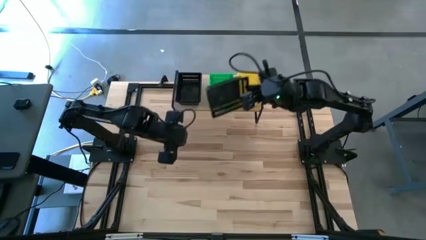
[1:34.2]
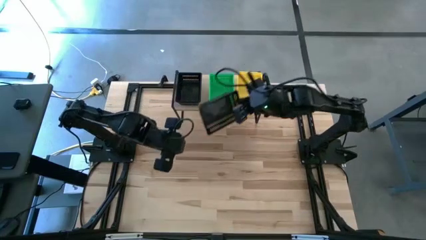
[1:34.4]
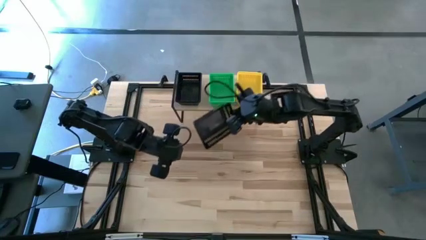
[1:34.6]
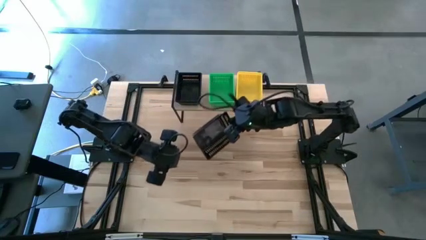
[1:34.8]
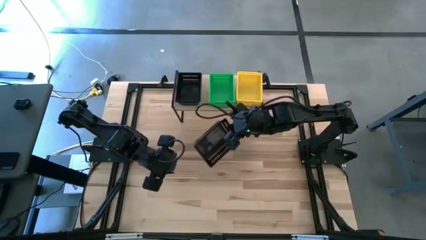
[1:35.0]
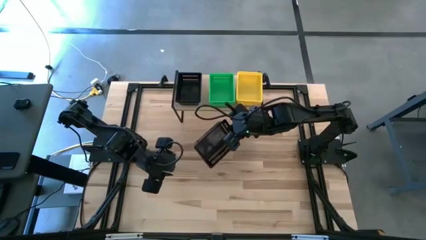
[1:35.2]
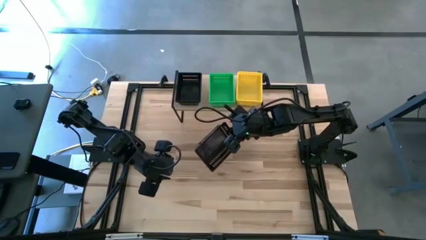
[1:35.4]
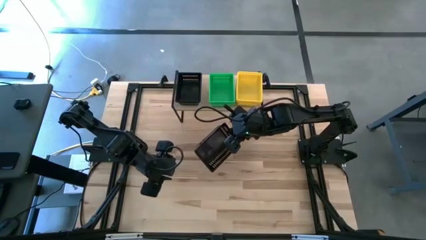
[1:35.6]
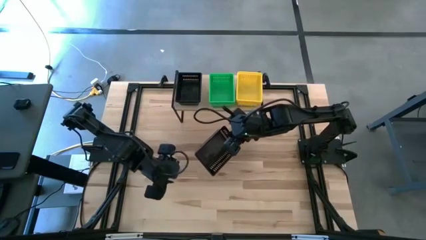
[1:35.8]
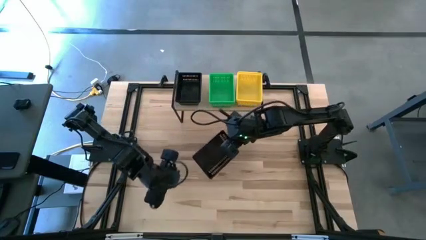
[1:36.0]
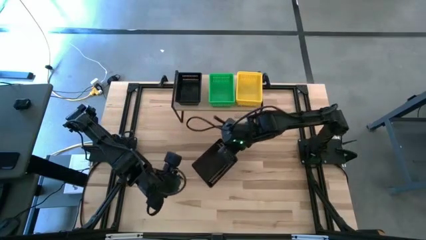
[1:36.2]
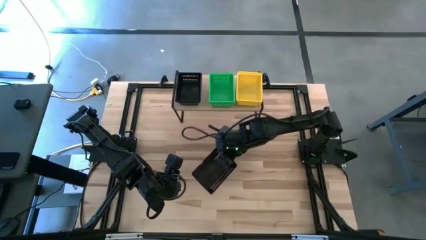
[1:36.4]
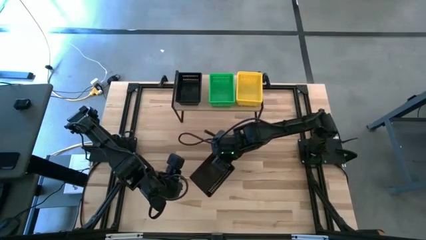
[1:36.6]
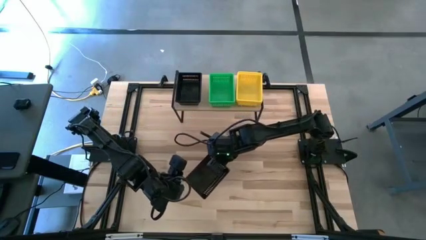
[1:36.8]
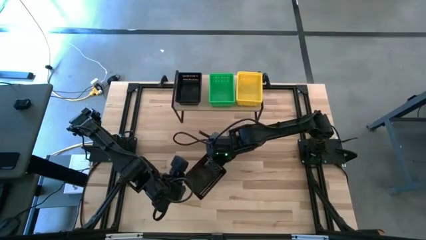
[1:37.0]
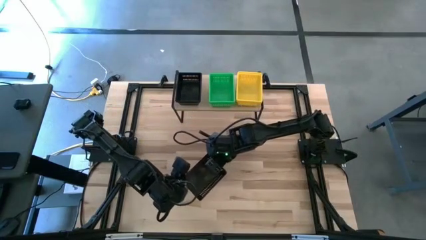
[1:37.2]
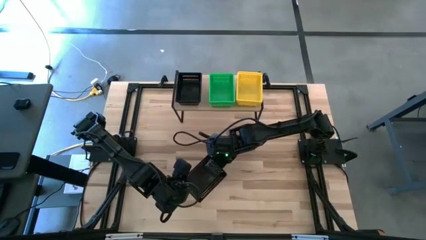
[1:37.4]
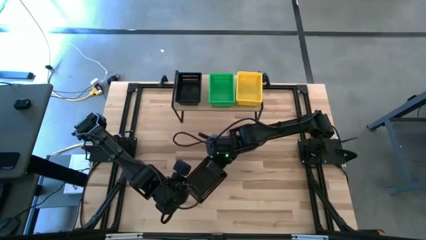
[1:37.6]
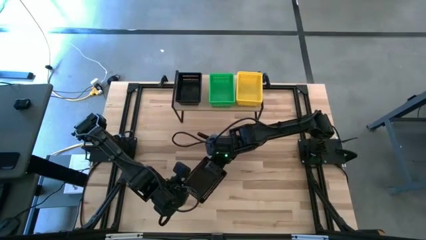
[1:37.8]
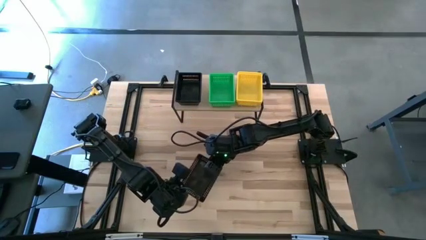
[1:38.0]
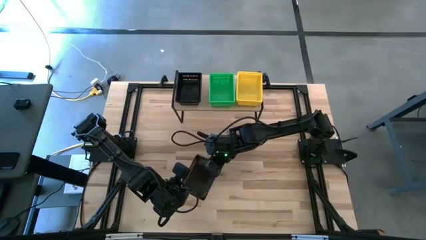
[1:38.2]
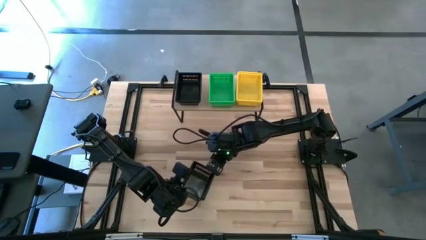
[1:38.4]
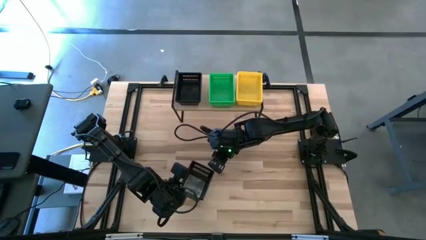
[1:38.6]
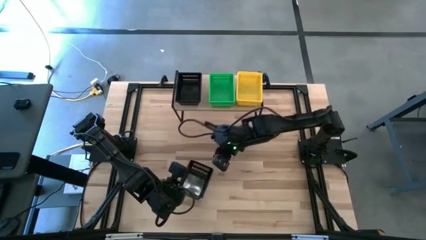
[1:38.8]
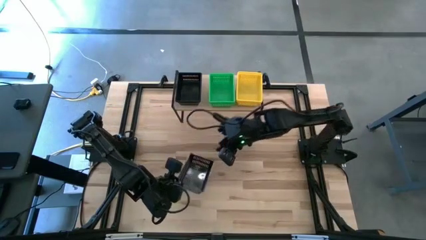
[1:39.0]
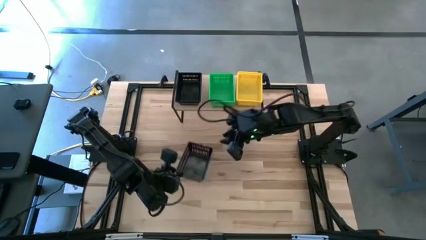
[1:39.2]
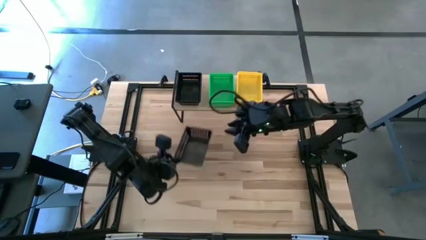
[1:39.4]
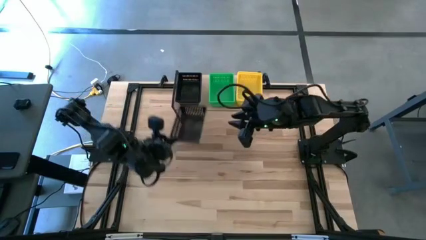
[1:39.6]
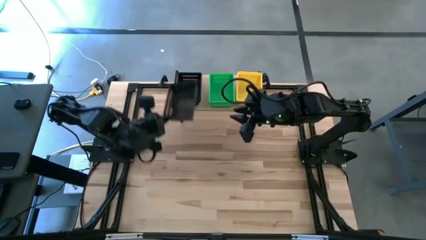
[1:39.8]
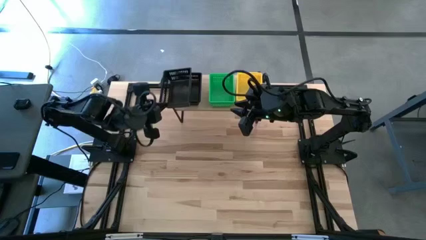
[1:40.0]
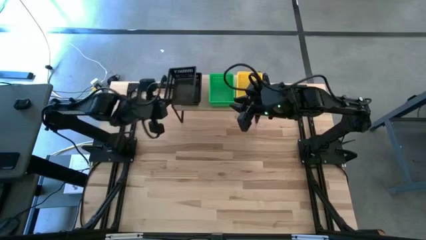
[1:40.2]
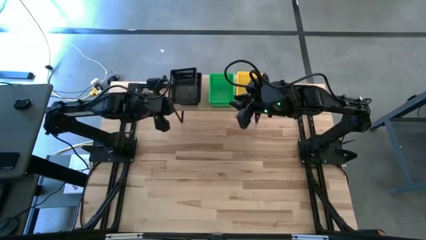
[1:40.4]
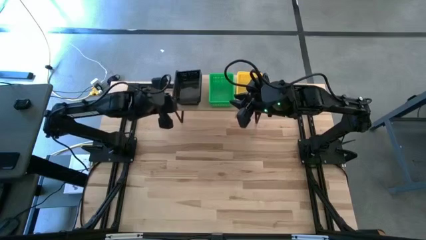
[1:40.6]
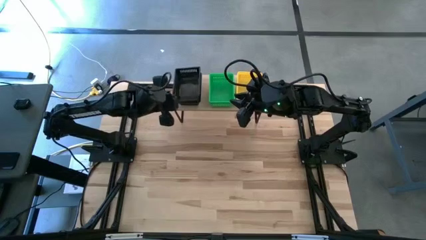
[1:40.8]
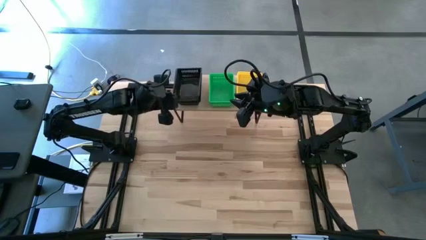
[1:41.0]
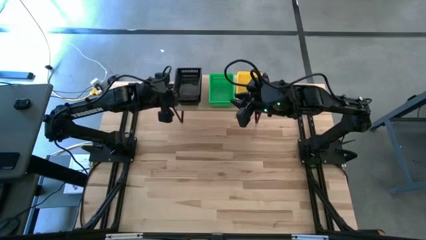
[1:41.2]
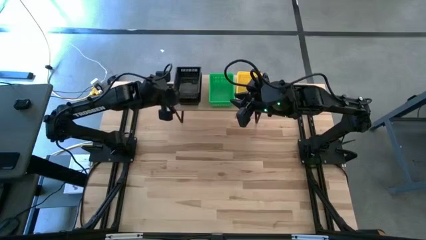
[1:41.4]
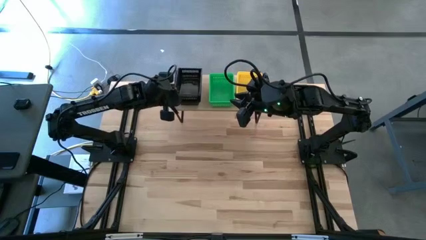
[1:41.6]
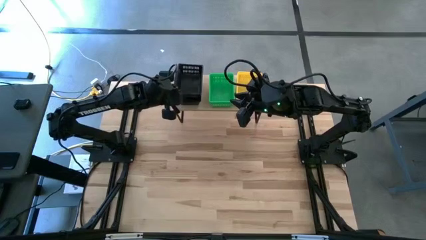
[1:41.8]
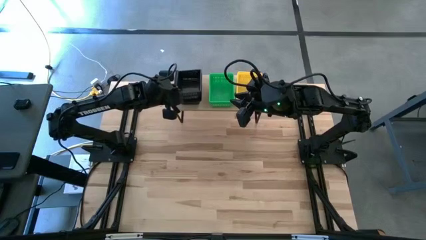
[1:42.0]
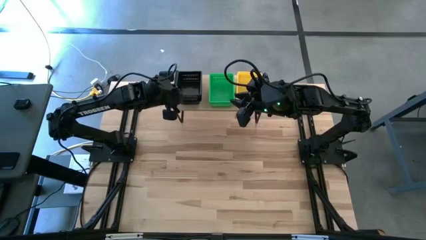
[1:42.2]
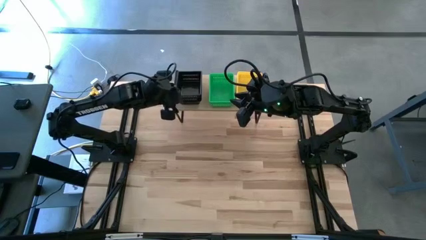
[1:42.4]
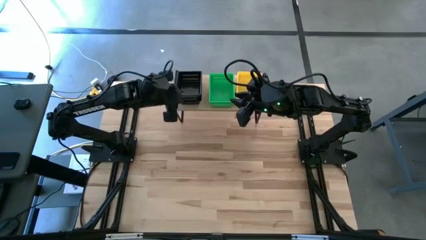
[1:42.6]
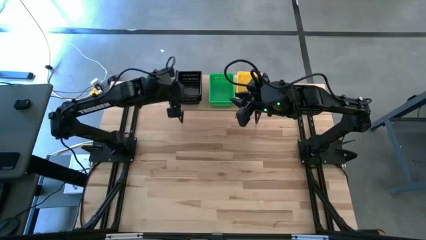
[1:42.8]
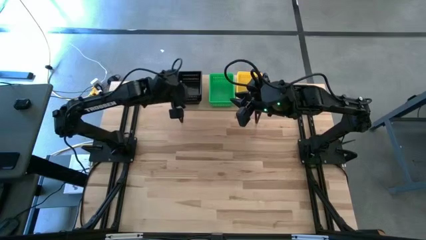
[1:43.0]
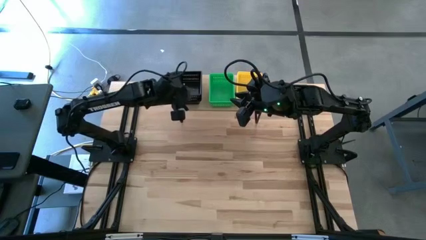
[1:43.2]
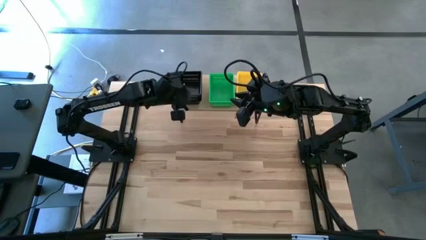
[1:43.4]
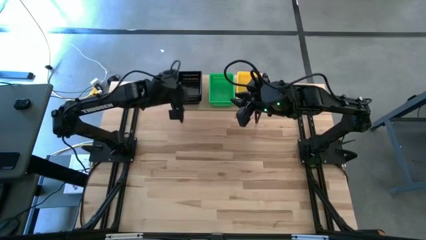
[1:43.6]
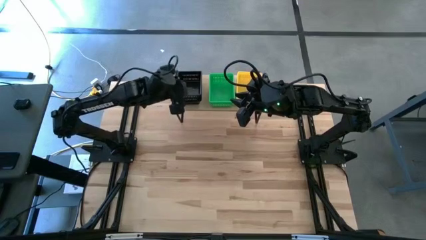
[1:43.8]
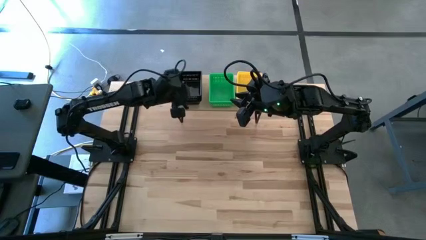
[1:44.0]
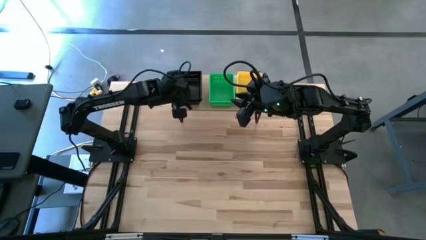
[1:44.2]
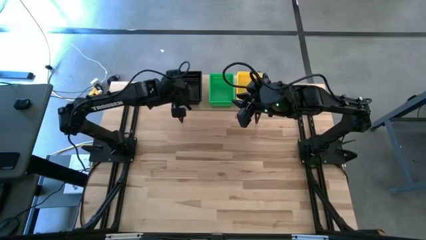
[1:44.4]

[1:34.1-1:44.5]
Task: Stack baskets on shelf by color
Stack the black bin on top of the other black bins on the shelf

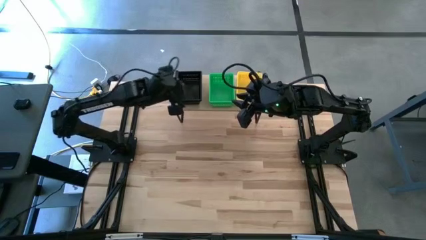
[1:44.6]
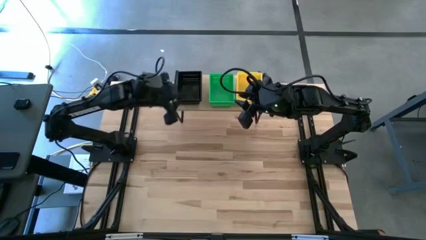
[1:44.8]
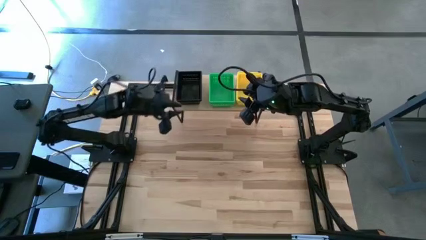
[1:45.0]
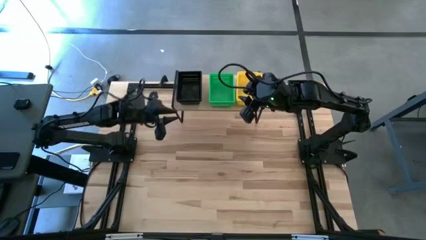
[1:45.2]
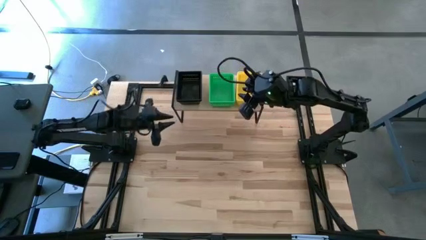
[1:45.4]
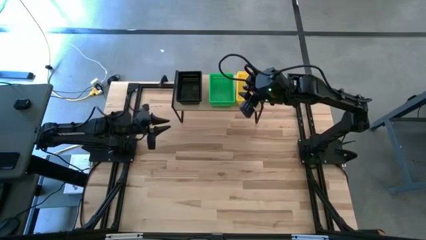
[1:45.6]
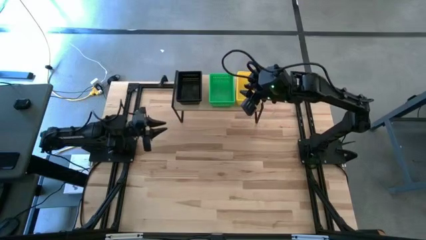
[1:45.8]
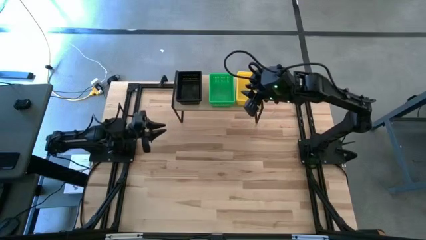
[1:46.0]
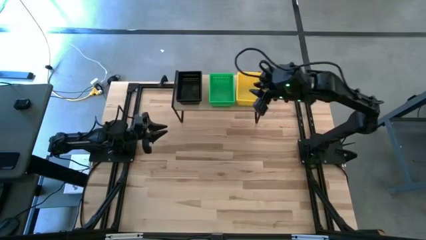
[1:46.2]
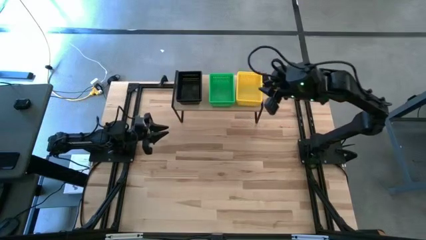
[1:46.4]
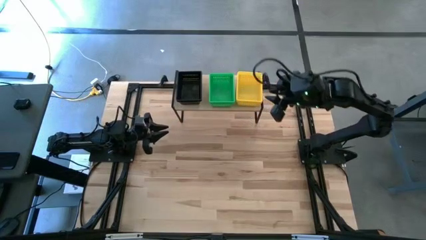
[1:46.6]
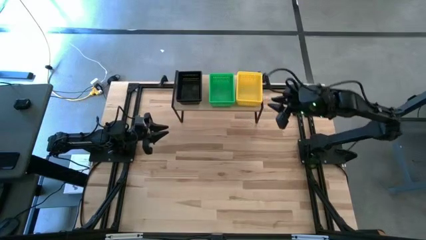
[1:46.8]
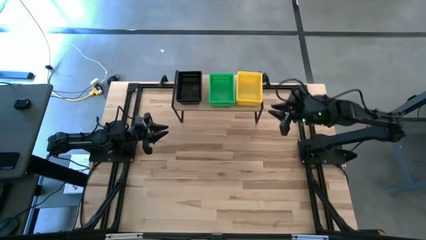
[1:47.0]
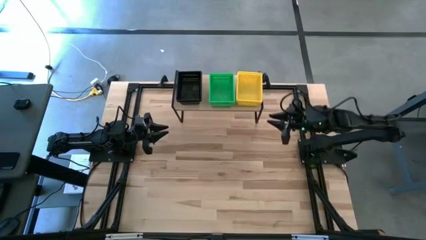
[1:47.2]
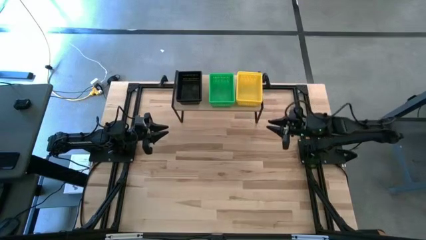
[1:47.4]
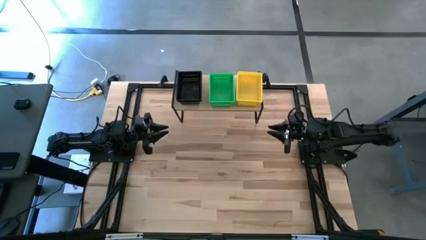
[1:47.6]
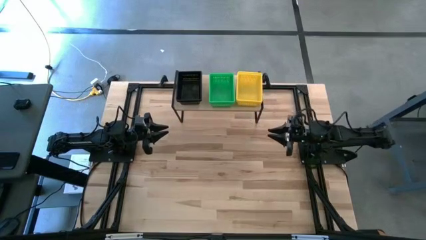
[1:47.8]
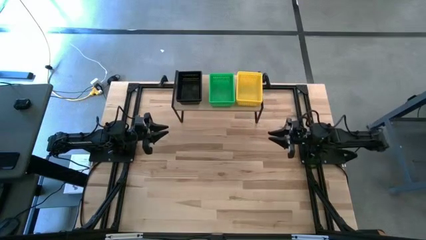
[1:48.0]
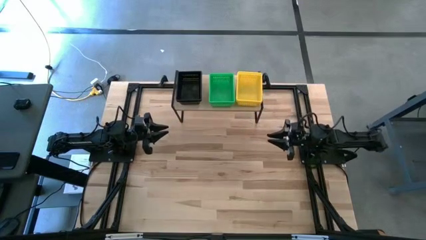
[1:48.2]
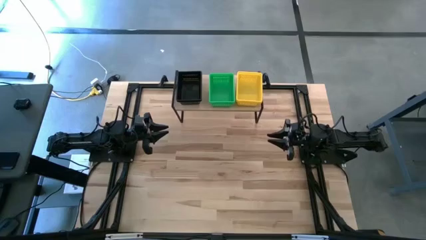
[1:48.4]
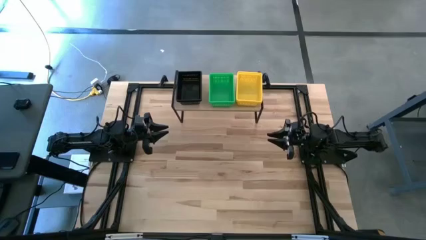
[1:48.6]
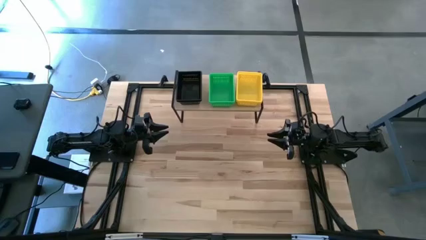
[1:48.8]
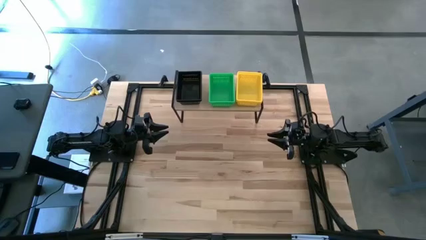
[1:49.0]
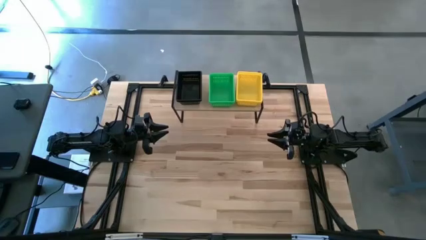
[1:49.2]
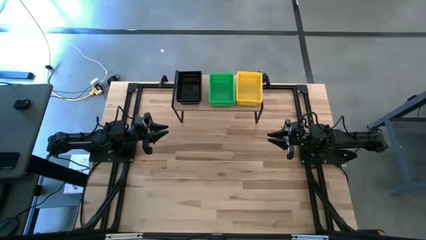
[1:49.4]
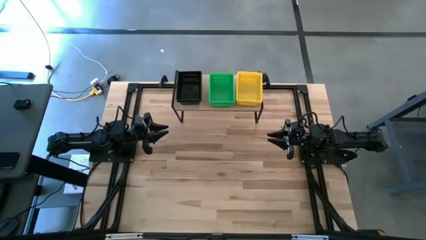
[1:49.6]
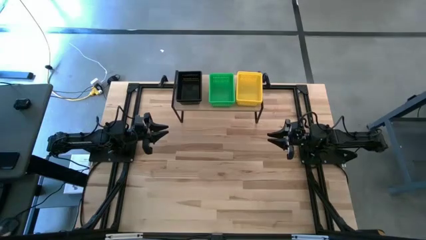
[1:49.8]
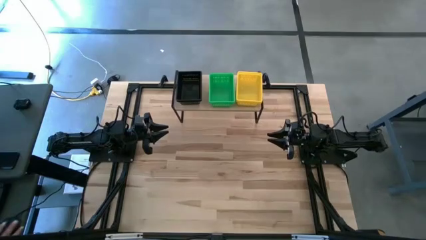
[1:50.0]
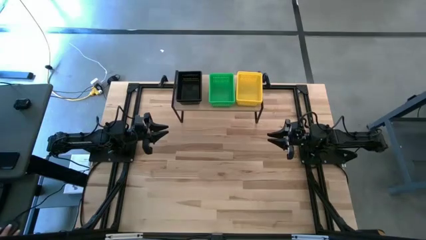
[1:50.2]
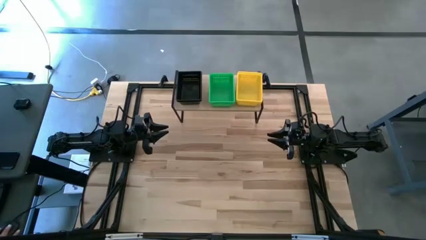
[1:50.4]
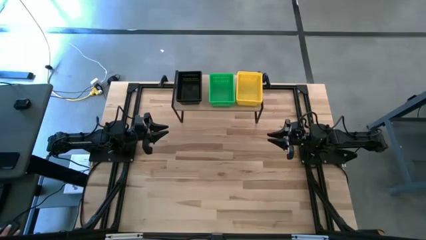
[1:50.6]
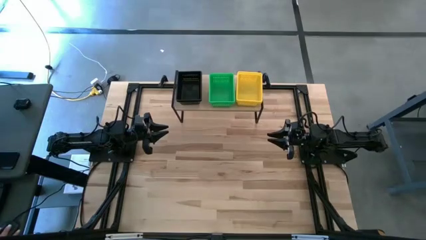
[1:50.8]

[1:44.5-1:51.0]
Return to Home Position
